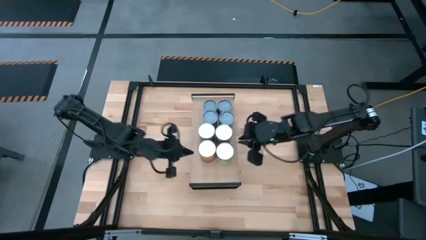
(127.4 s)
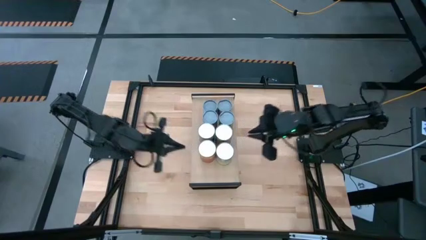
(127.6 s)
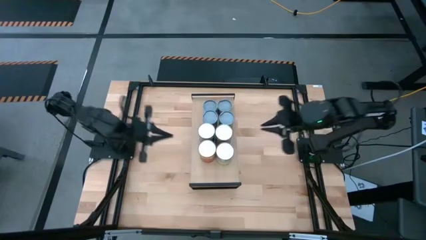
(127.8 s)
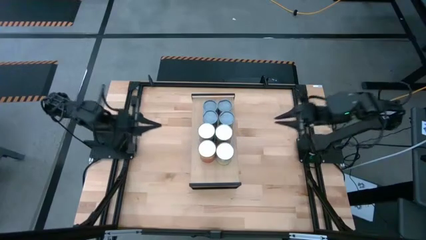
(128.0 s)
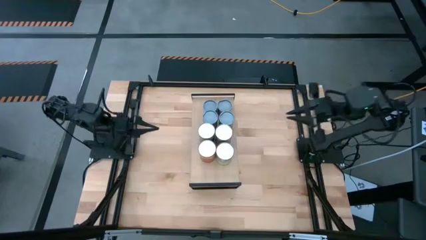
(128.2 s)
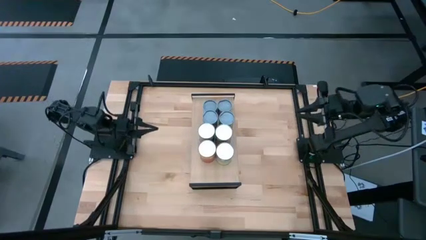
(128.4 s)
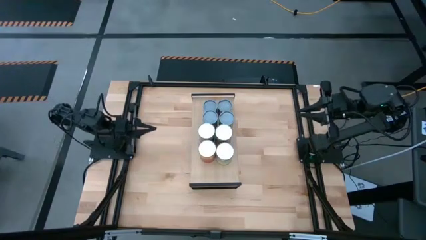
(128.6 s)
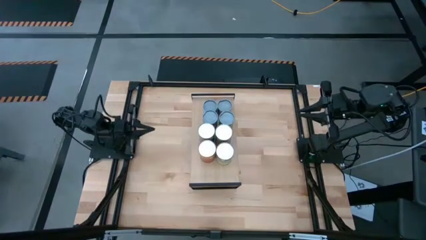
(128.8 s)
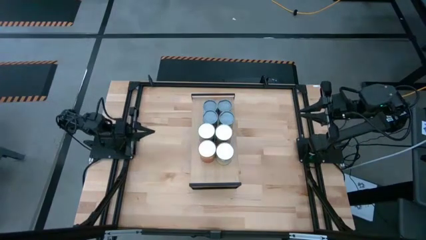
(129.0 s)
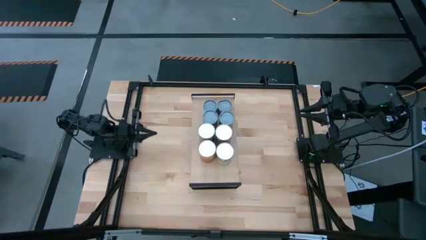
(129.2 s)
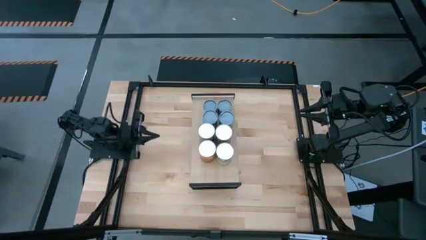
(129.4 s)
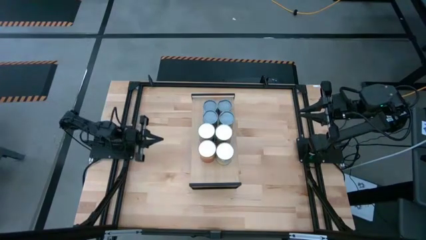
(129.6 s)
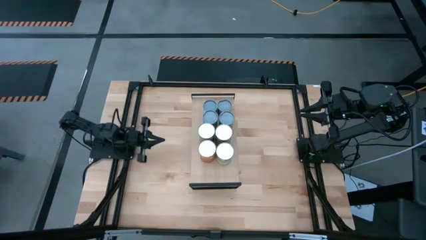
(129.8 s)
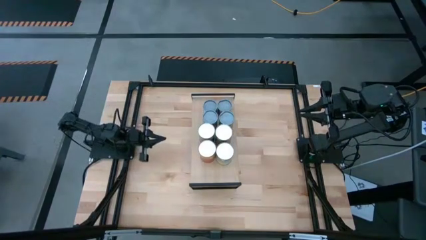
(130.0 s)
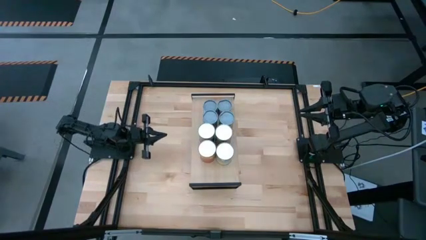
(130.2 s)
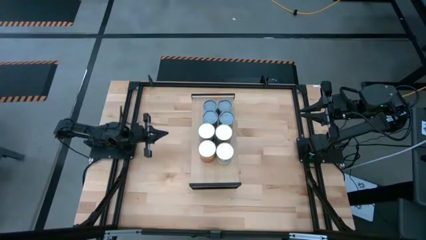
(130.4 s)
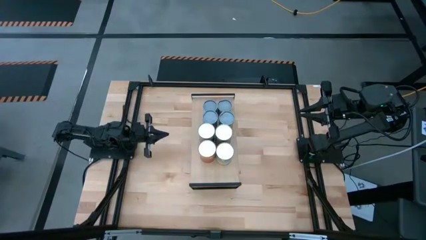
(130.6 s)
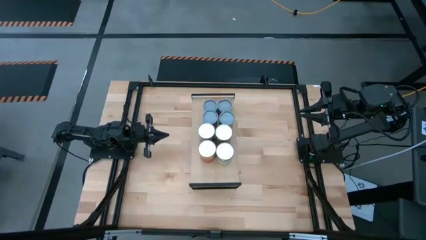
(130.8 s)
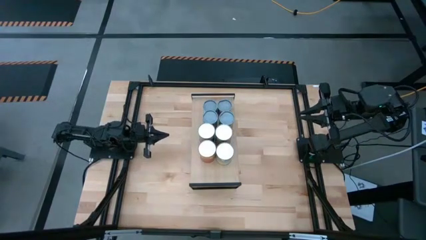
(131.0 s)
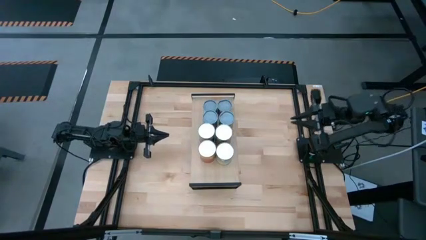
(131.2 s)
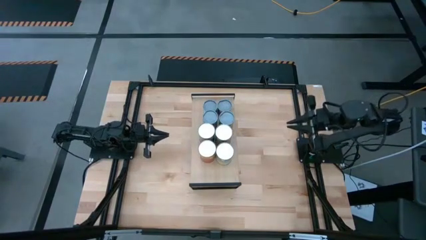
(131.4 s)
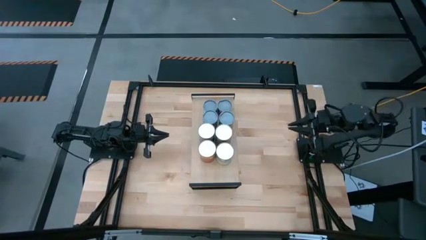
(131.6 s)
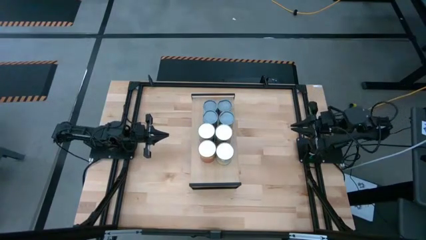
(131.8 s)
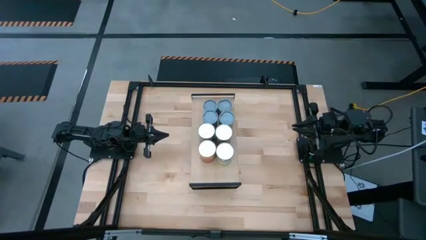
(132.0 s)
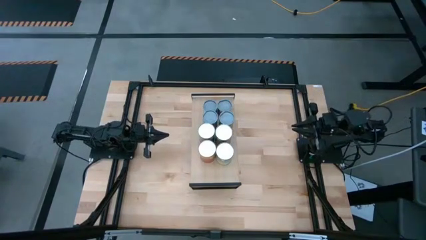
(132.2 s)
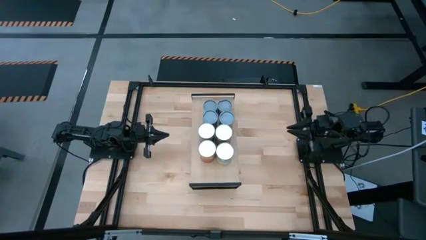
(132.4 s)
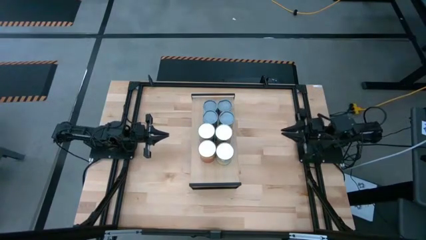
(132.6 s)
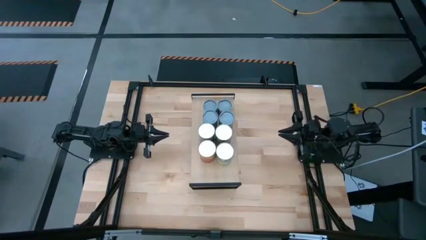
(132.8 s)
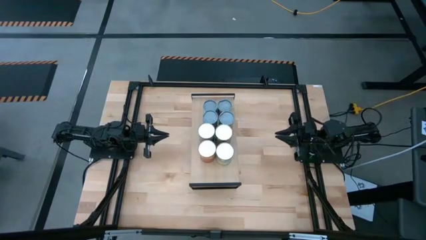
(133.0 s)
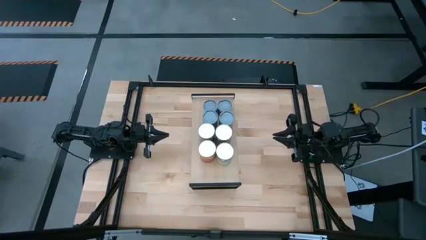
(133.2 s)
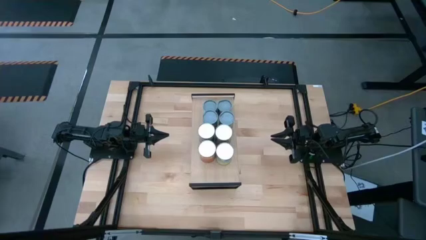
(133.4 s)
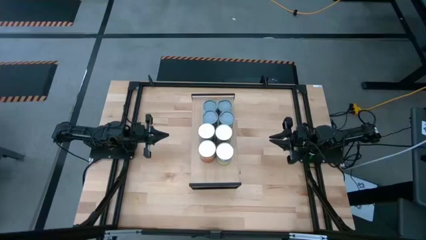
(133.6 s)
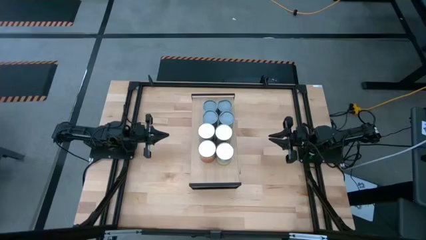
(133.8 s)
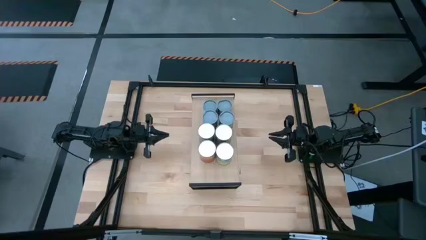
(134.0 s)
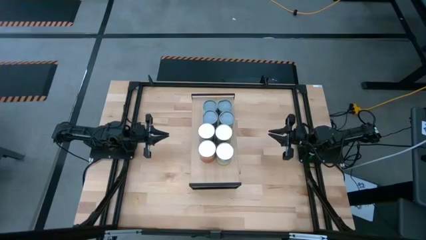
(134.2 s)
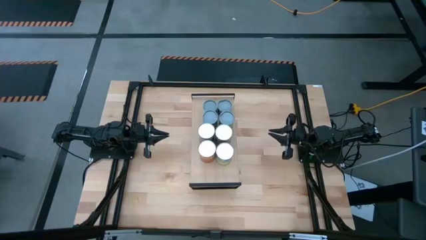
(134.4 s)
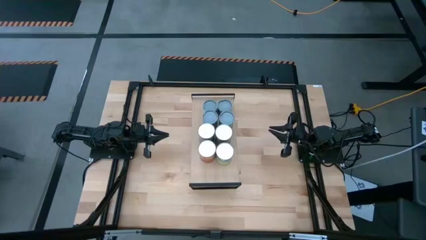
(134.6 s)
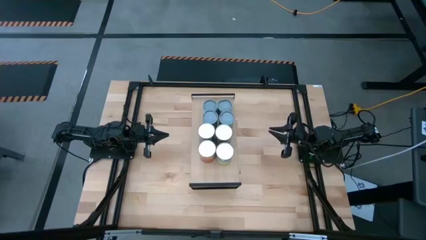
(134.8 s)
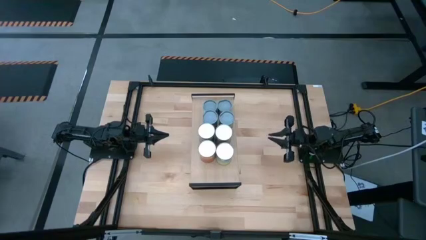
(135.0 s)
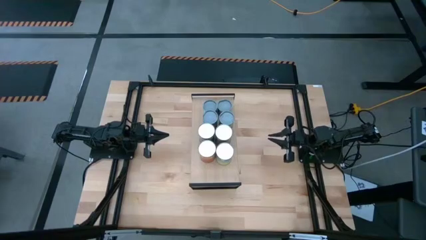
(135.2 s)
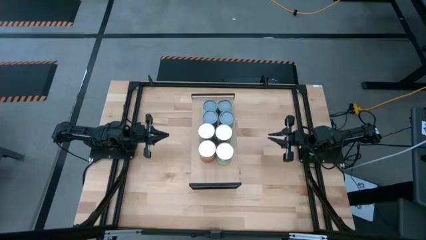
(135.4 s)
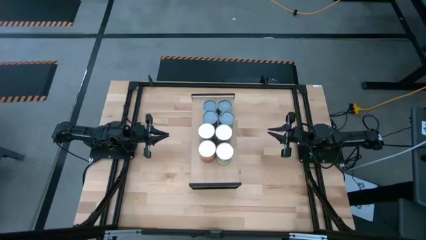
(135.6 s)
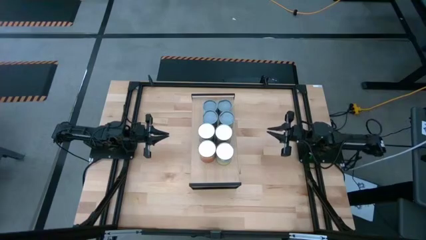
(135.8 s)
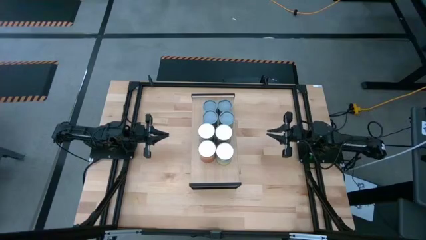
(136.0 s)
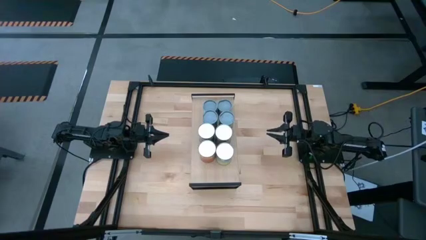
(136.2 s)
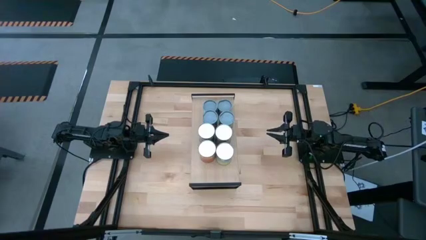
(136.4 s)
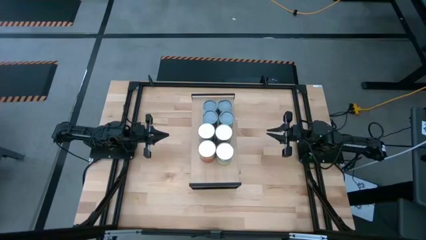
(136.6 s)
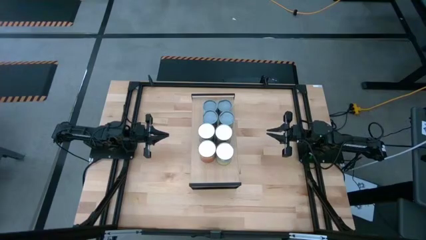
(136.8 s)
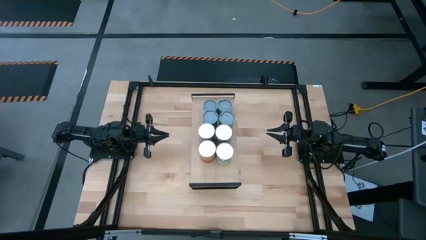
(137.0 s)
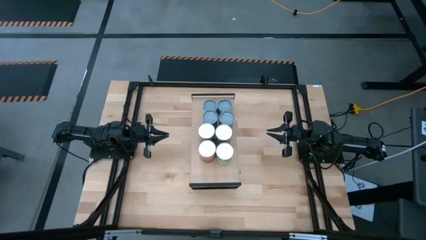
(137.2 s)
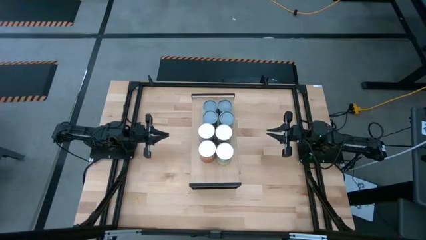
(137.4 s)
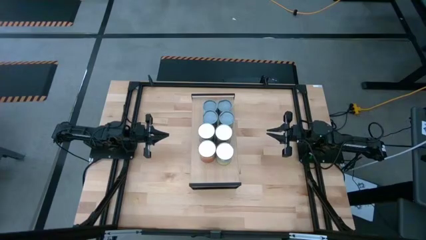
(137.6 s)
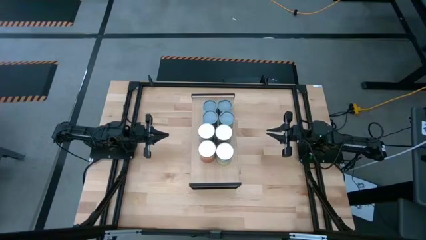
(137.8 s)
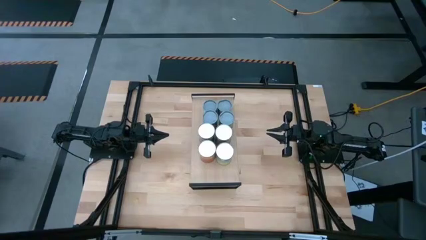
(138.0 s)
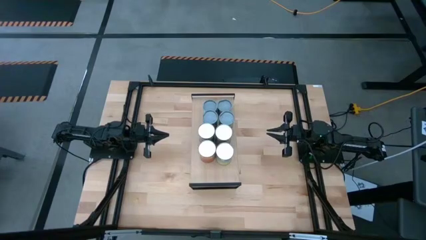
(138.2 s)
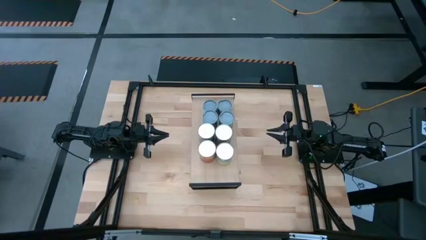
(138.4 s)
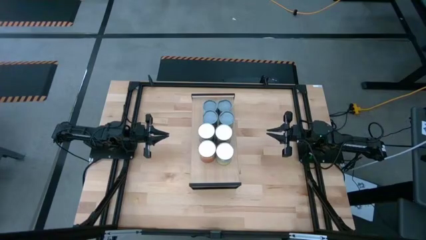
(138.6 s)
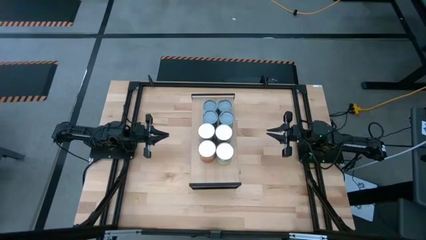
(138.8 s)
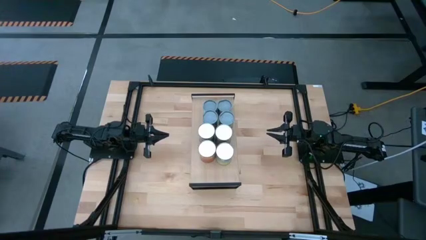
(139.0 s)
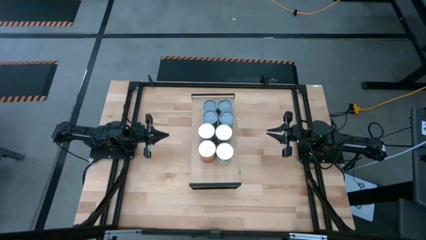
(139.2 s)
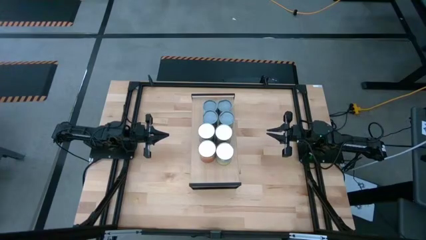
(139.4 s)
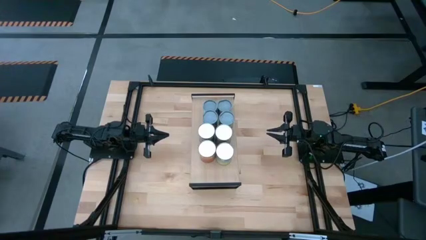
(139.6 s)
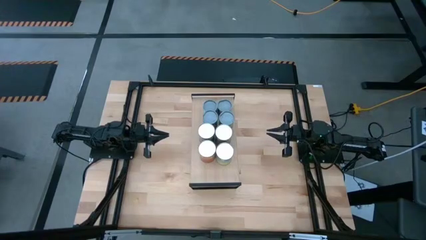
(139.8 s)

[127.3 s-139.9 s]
Task: Pick and place cans onto a shelf
Return to Home Position

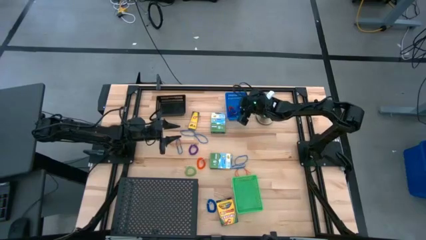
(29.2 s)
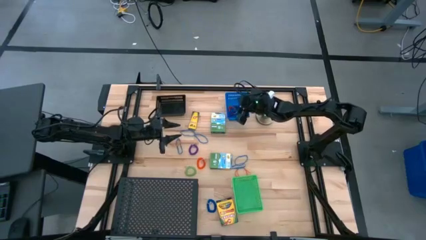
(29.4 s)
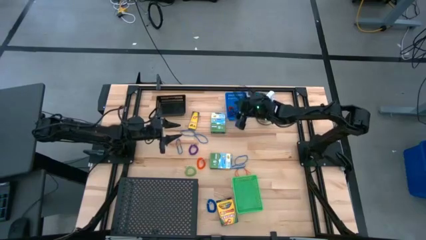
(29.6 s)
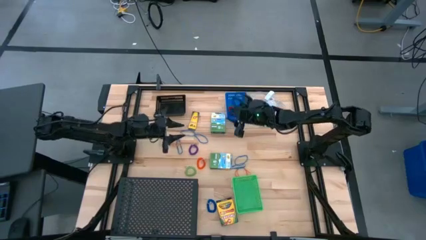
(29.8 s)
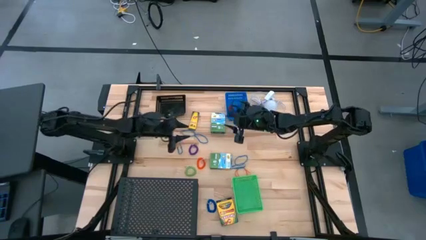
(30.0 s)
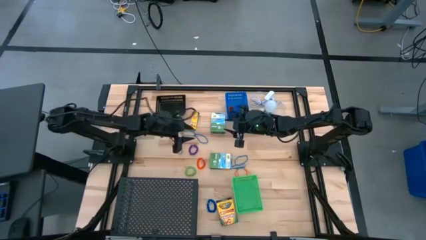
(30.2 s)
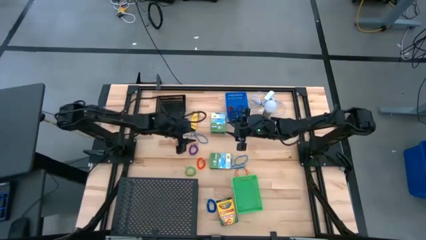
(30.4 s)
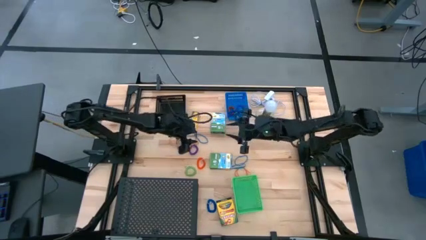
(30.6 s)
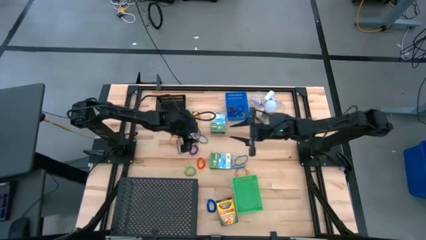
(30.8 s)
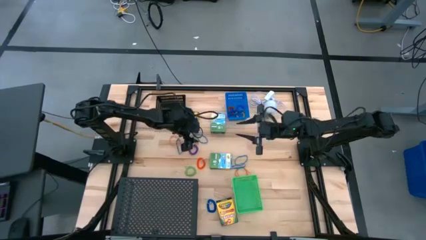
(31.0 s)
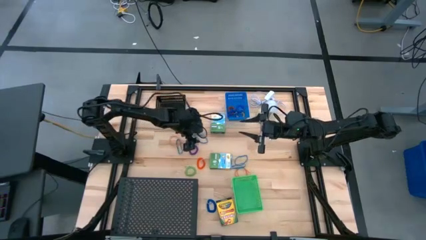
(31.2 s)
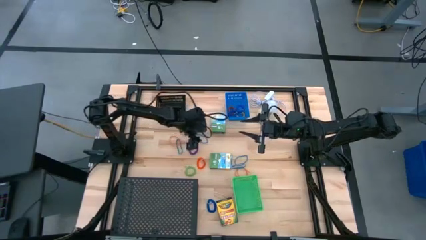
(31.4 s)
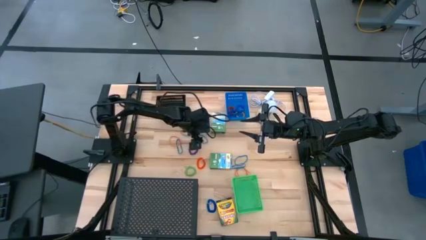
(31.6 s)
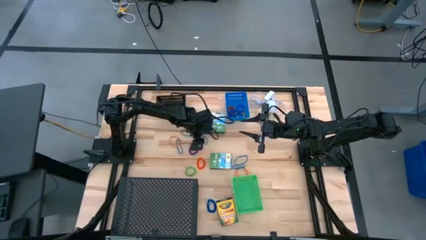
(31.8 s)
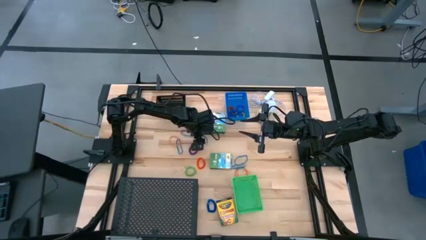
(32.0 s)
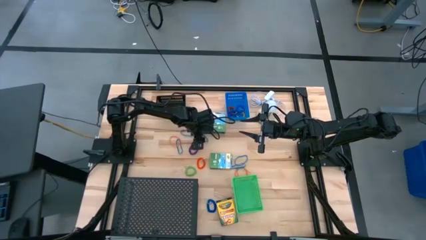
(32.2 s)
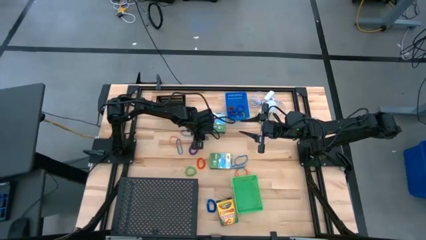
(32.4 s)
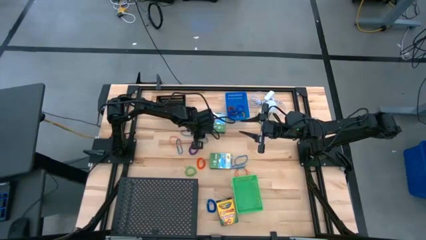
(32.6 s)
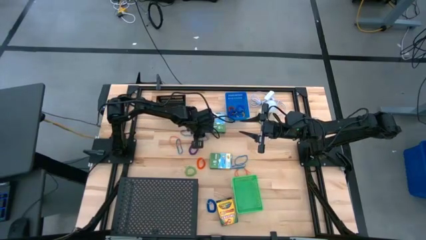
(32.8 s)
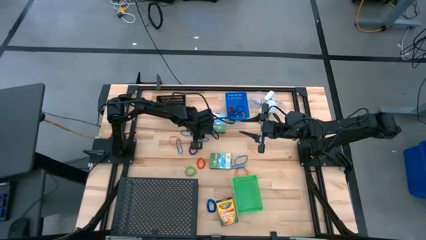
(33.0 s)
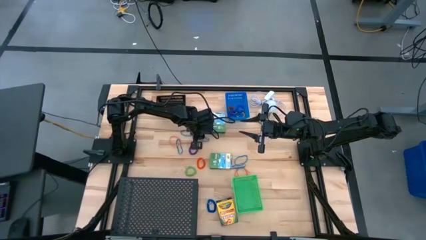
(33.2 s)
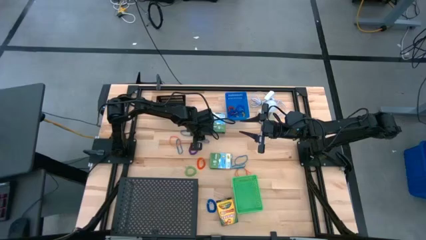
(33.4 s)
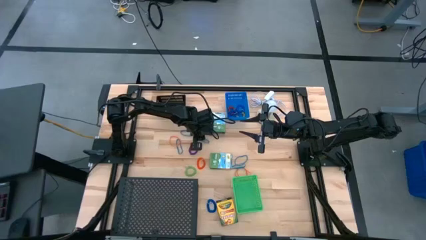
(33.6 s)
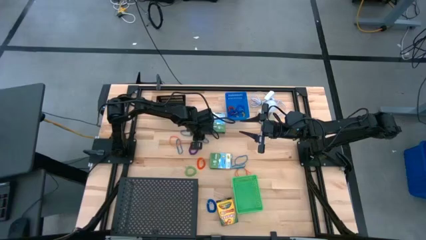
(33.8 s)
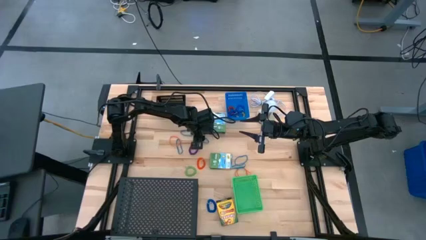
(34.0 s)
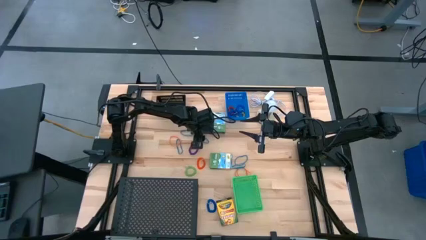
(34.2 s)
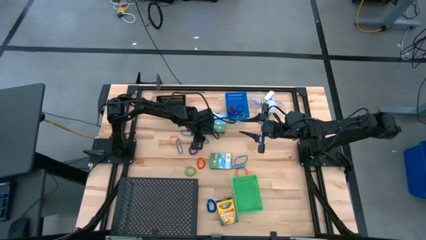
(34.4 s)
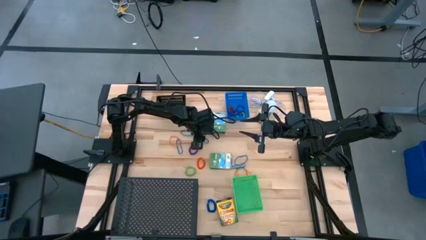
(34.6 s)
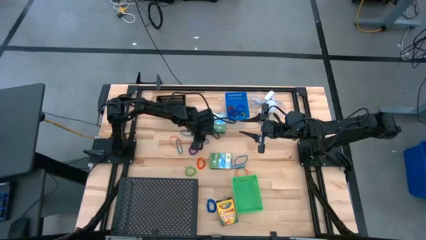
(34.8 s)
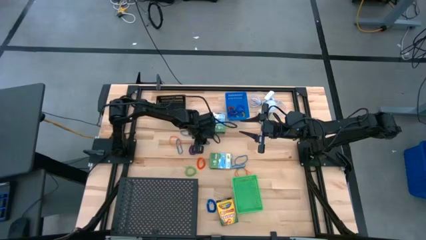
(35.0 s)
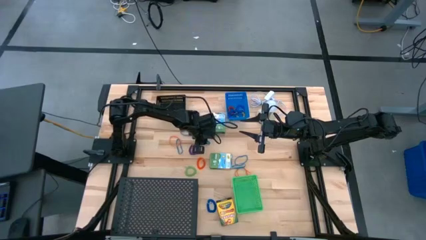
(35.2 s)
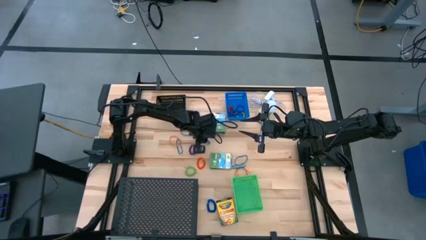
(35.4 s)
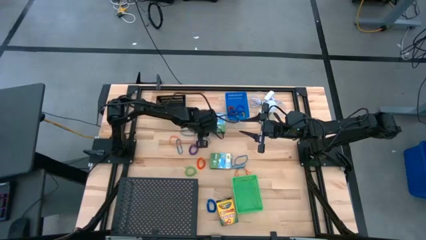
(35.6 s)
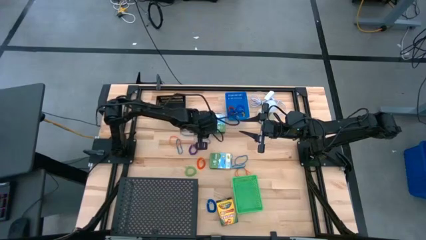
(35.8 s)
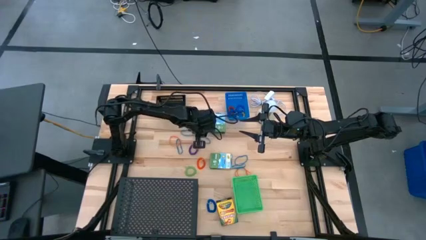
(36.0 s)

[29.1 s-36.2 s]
Task: Pick & Place Office Desk Supplies
Put the blue rubber band into the black bin
